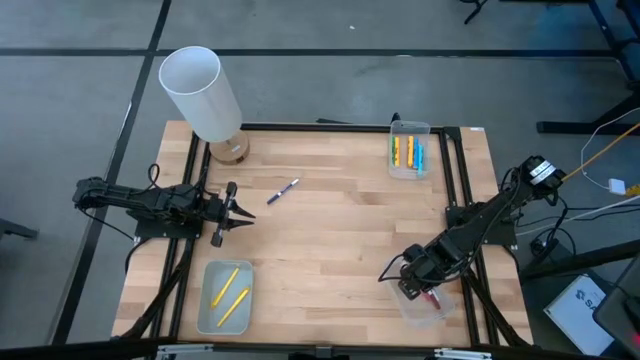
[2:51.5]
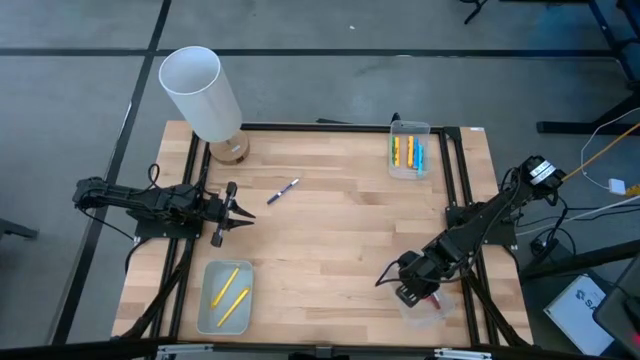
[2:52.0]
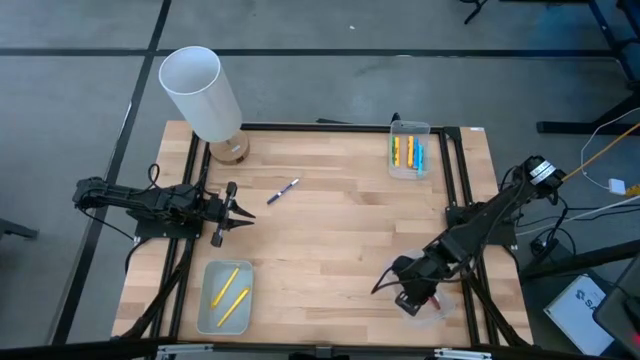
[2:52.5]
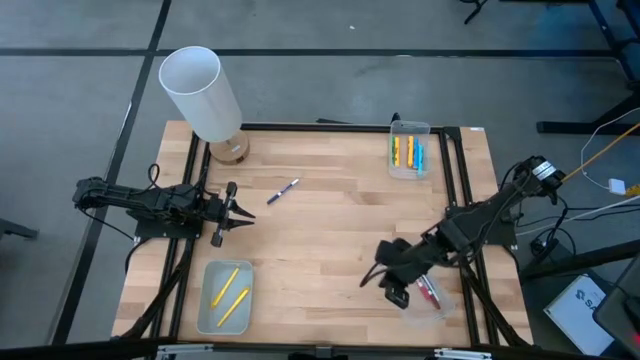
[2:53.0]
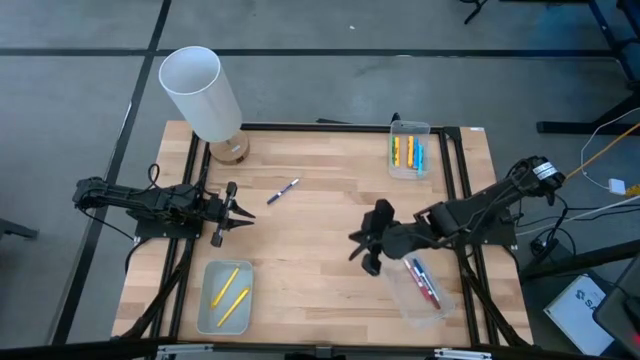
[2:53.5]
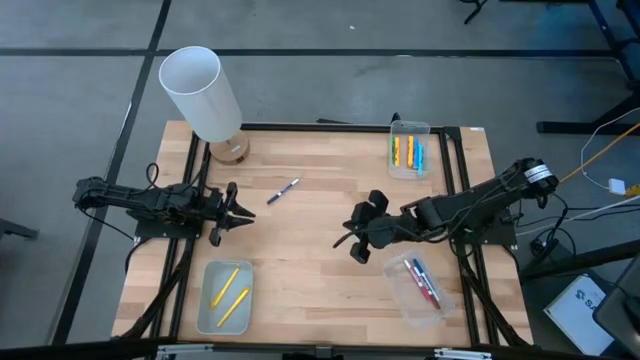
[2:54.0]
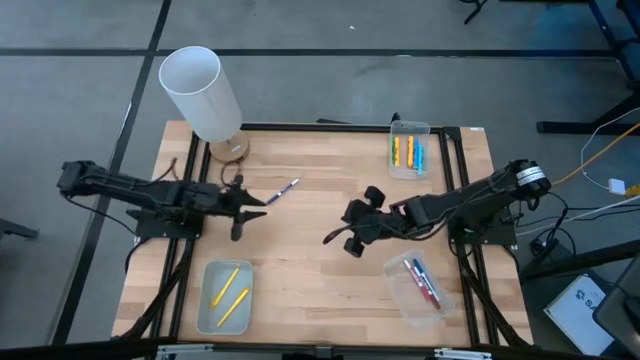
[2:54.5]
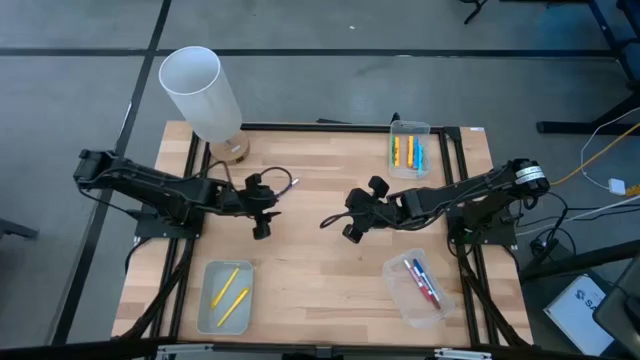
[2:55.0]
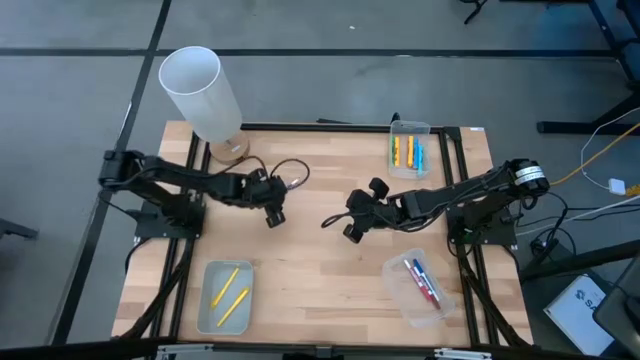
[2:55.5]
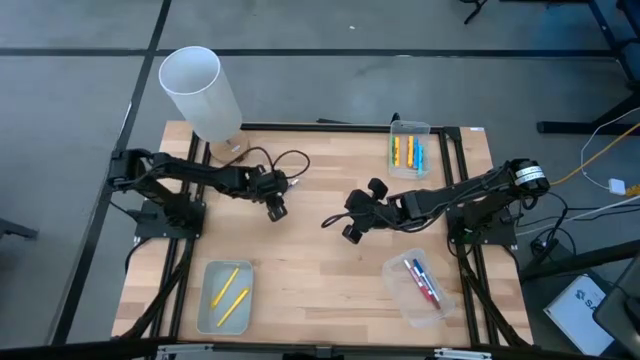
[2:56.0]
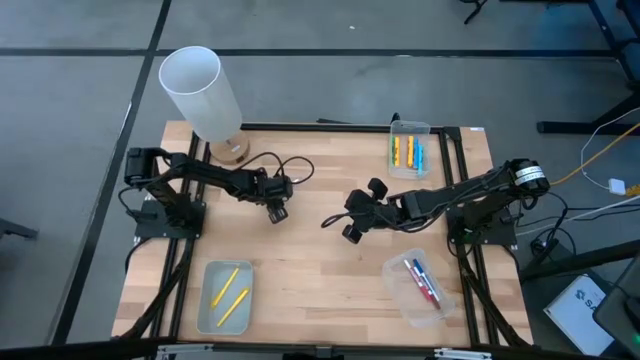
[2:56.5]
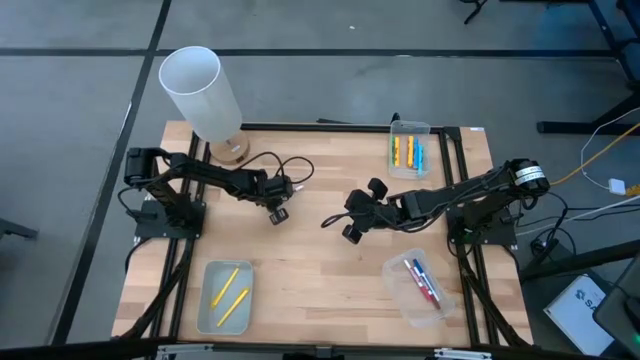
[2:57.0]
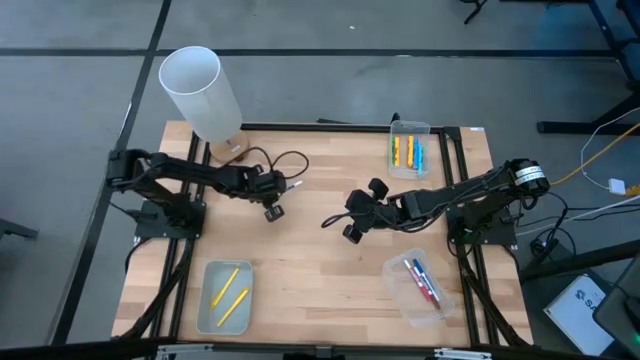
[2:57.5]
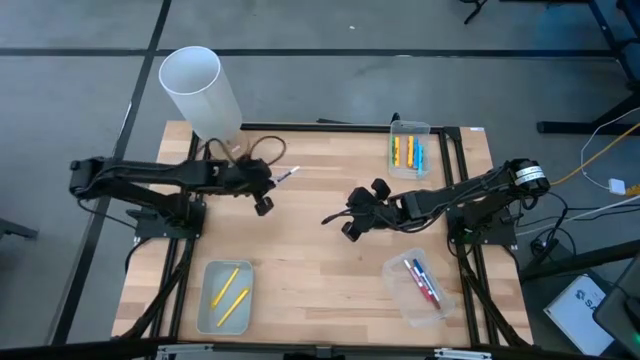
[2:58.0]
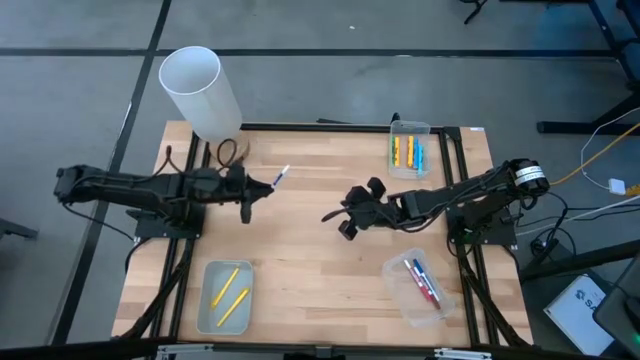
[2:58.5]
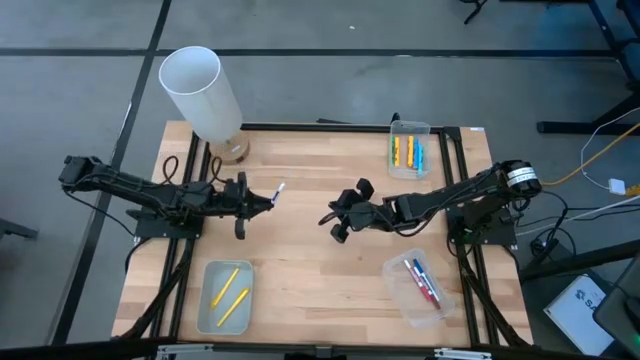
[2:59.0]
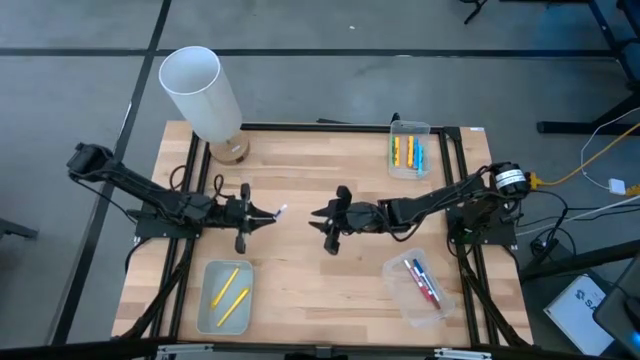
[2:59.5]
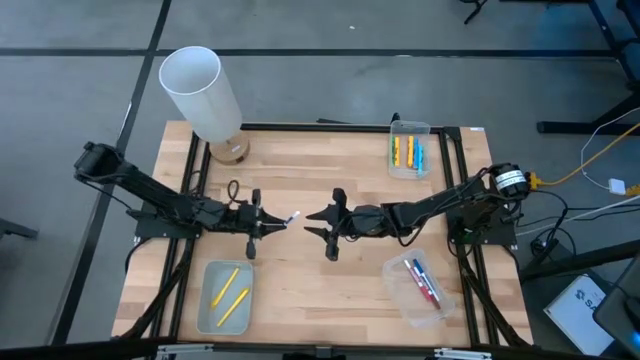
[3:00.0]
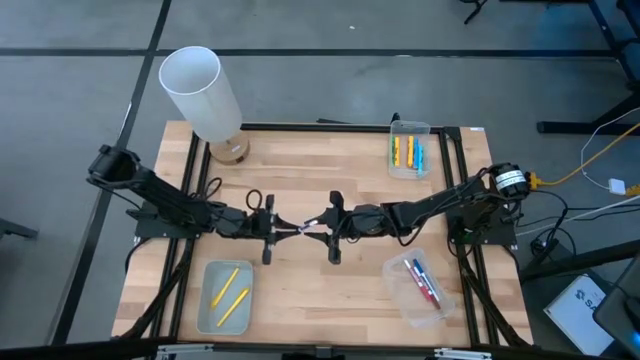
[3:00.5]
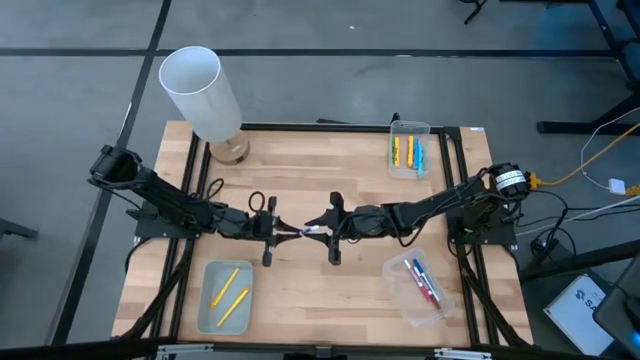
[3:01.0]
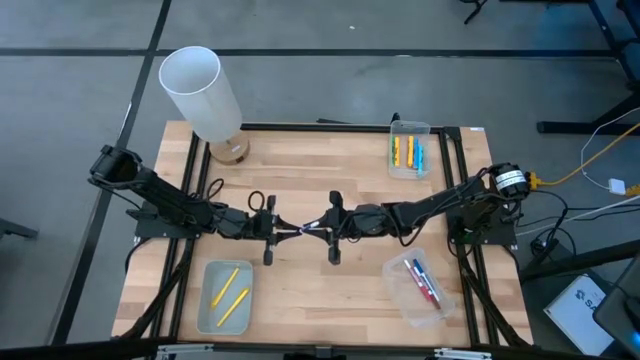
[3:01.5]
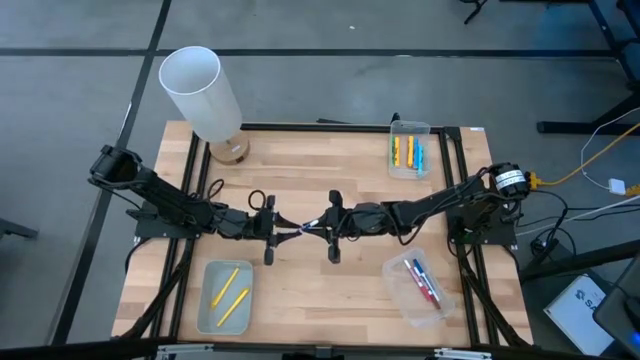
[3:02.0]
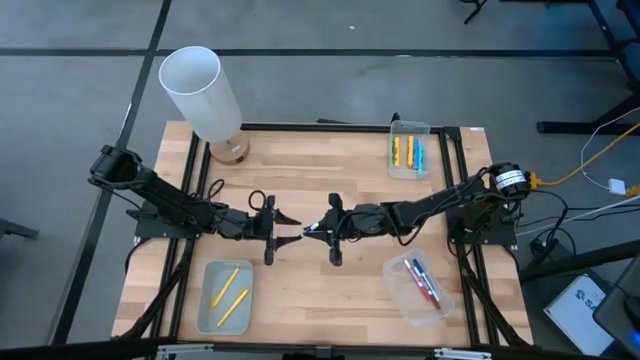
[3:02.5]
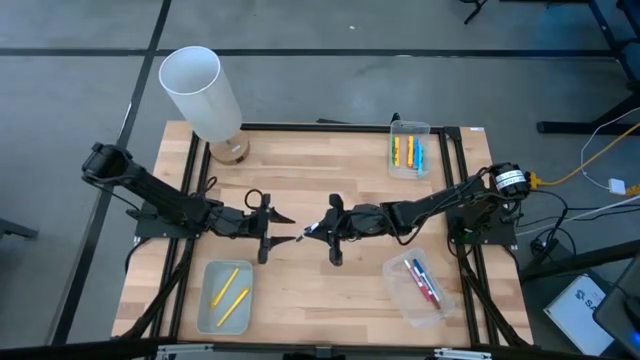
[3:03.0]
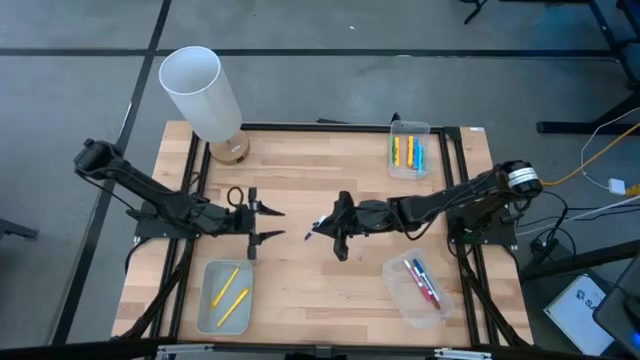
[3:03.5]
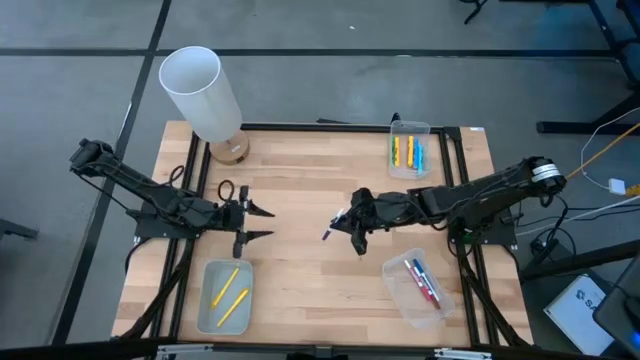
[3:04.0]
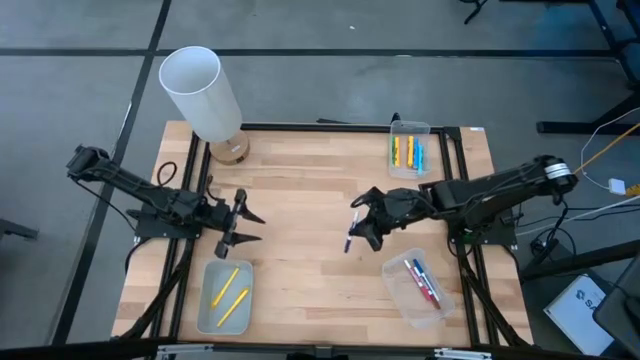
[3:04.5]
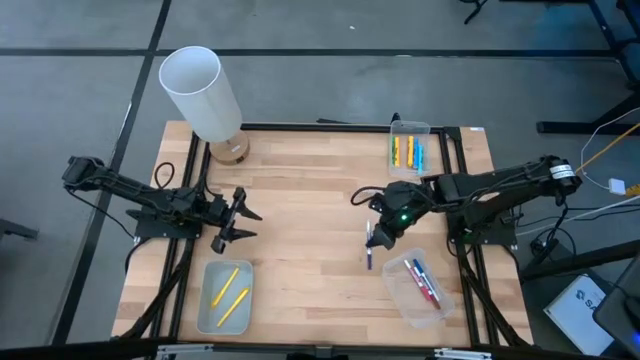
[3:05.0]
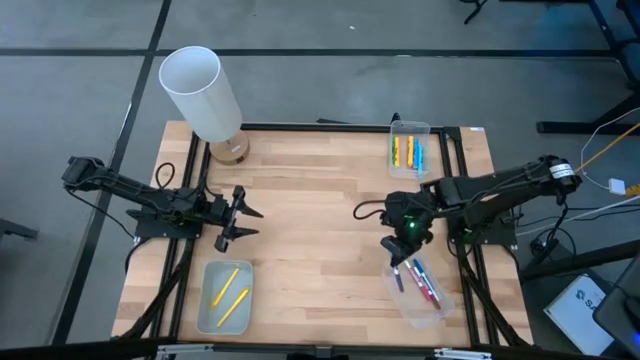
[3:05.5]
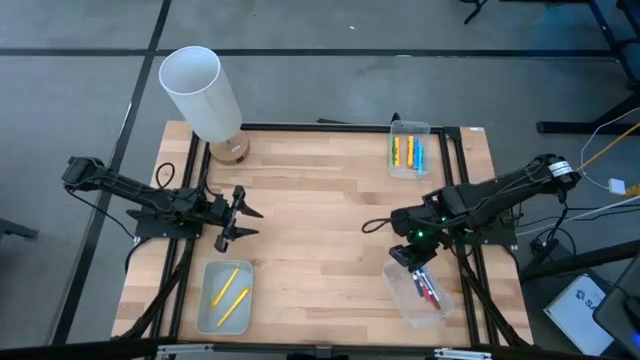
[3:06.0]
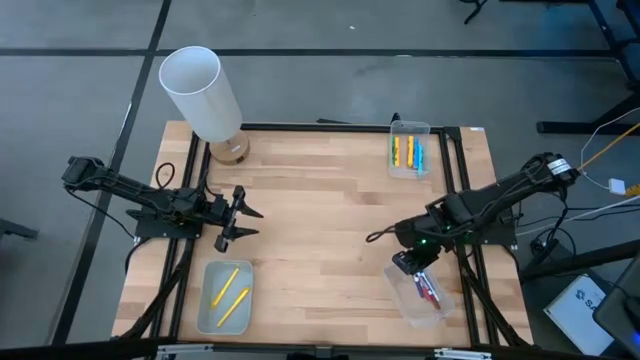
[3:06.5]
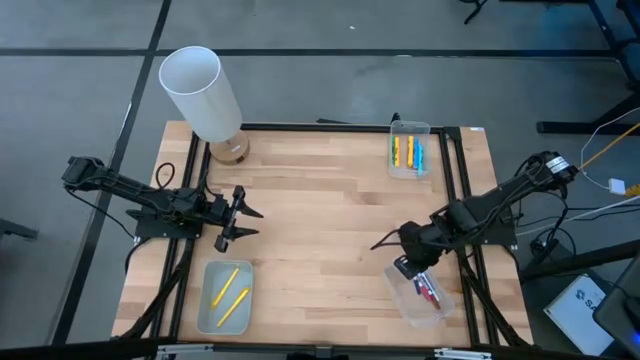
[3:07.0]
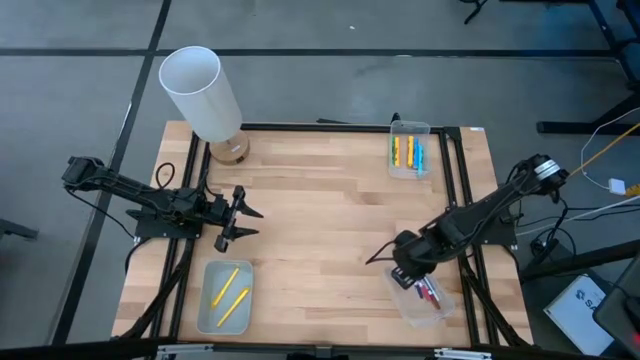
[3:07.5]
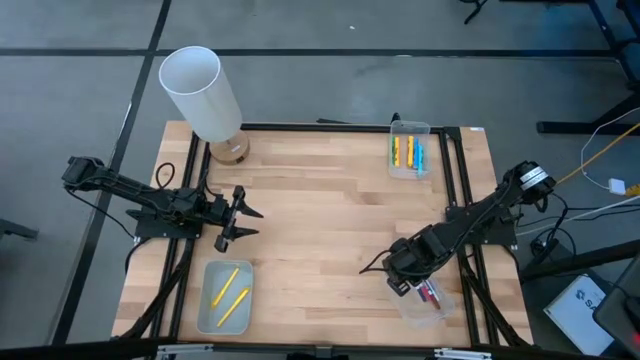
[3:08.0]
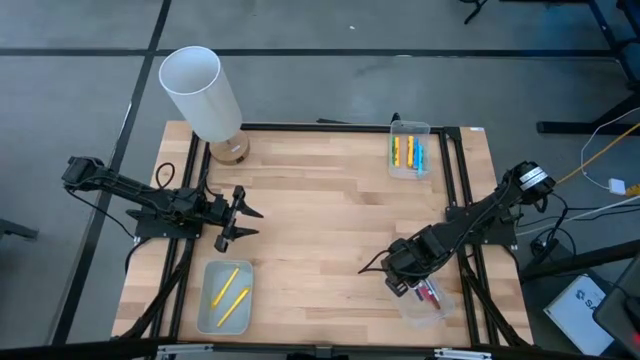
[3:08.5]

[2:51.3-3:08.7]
Task: Pick & Place Markers
Put the dark blue marker pen into the bottom transparent bin

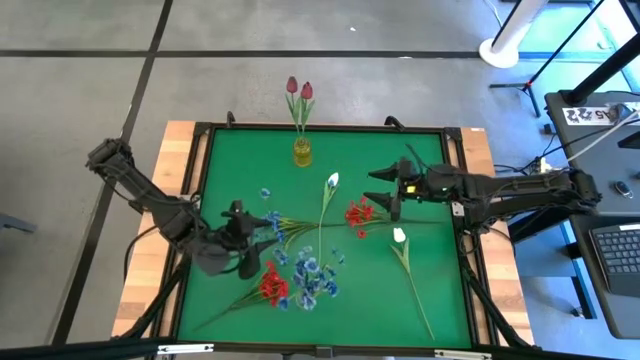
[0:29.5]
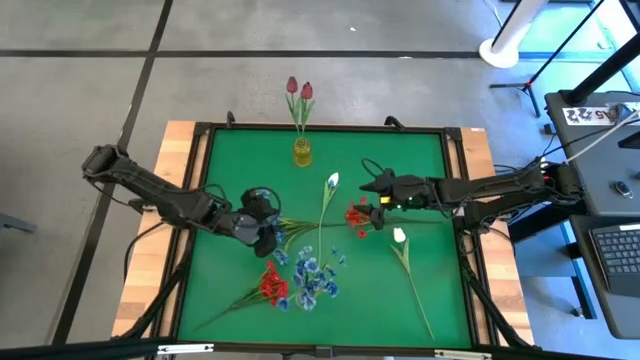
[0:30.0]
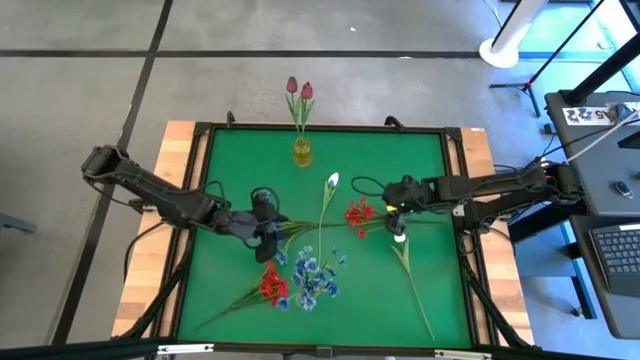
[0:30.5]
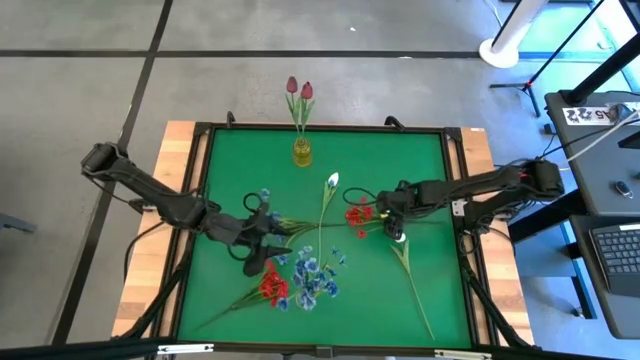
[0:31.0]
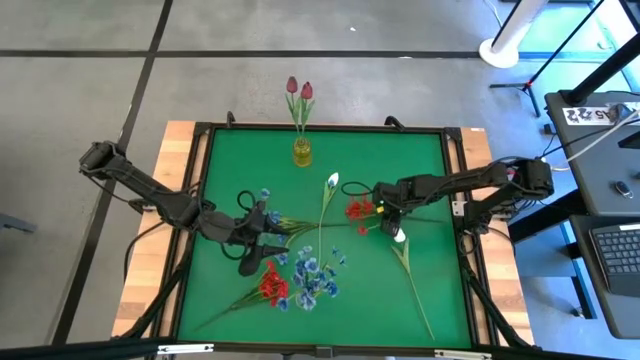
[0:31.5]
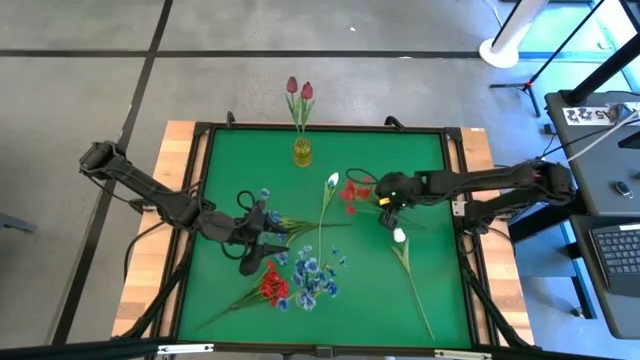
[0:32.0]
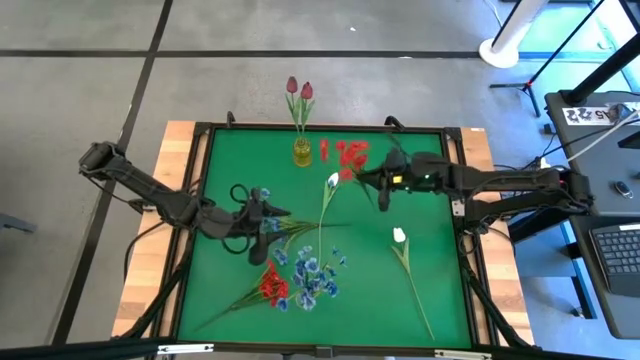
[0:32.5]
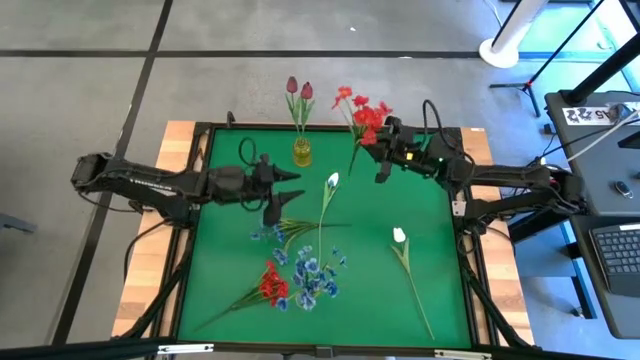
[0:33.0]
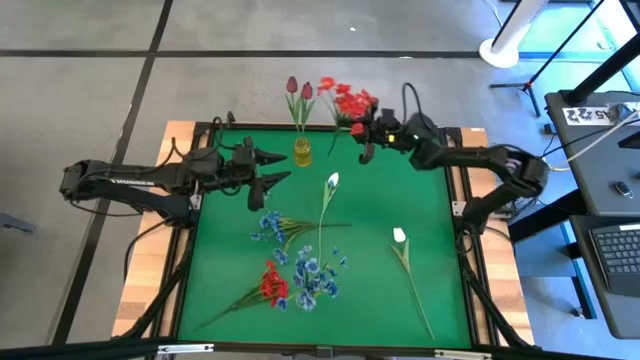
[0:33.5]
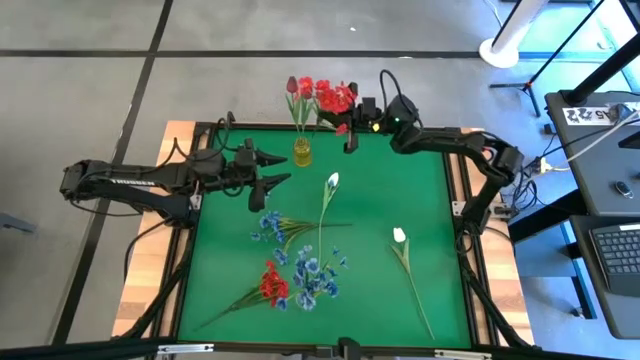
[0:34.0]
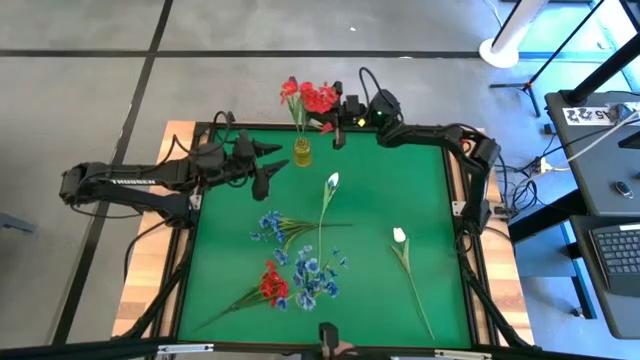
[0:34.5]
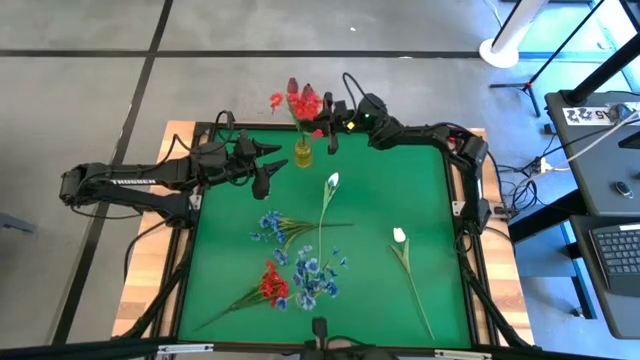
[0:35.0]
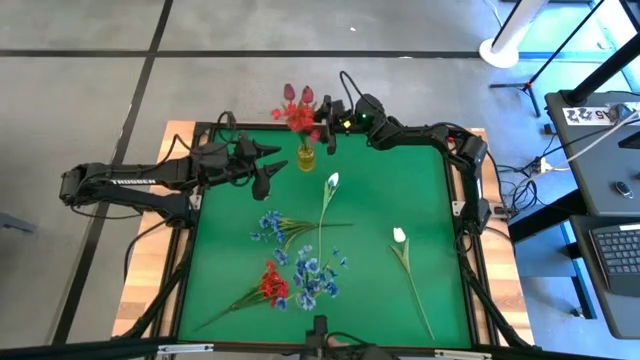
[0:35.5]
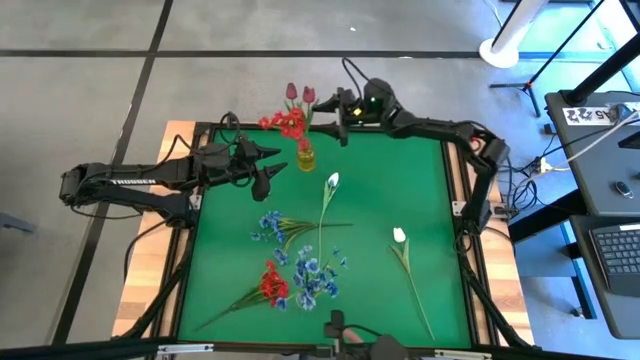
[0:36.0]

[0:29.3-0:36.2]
Task: Sort flowers into vase by color
Put the top red flowers into the yellow vase
